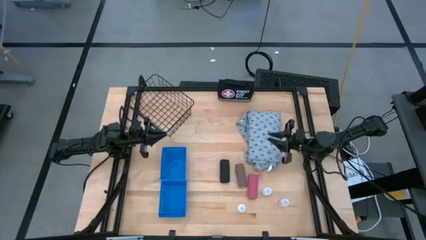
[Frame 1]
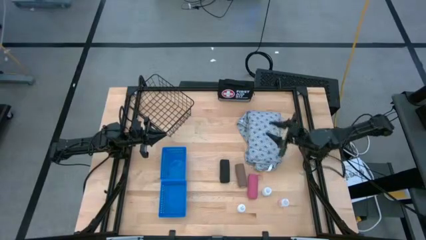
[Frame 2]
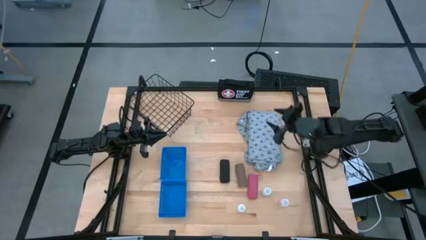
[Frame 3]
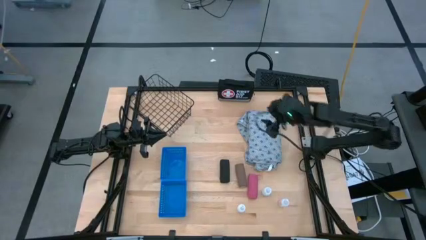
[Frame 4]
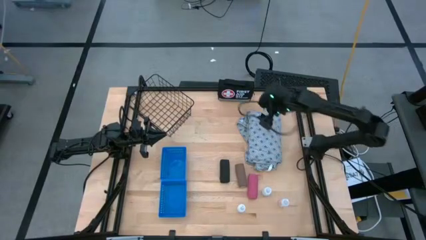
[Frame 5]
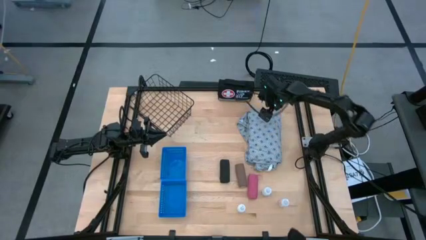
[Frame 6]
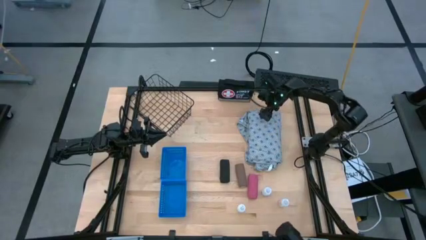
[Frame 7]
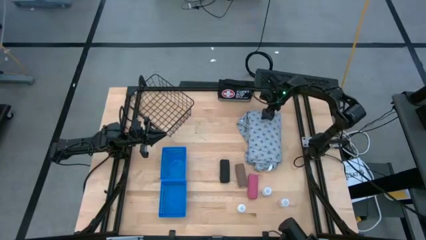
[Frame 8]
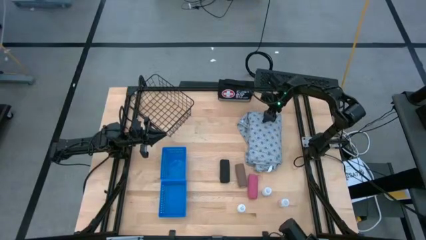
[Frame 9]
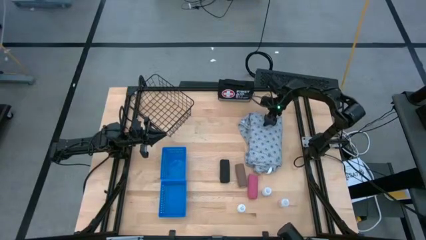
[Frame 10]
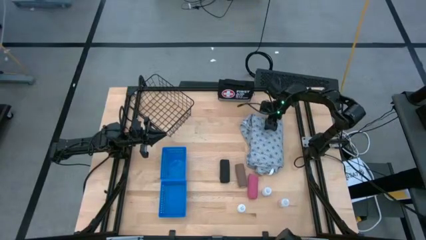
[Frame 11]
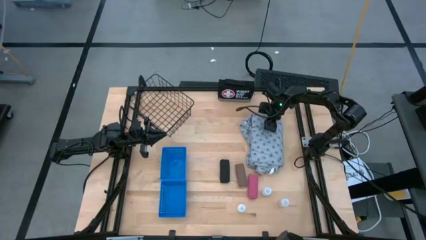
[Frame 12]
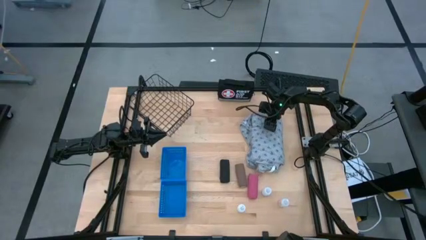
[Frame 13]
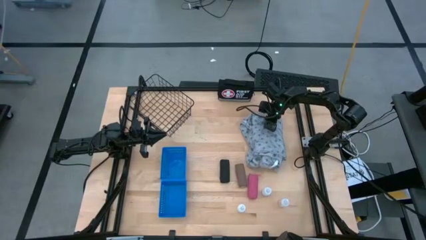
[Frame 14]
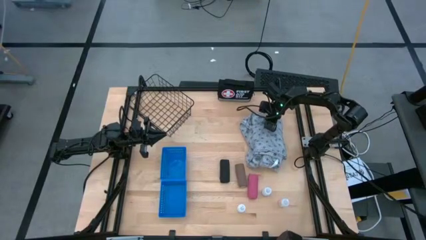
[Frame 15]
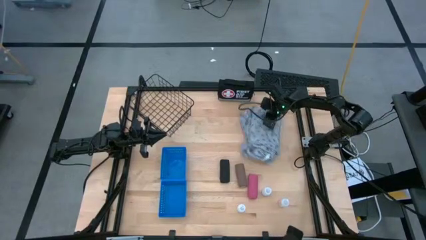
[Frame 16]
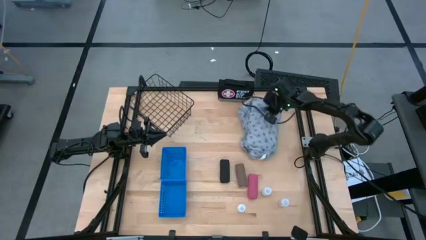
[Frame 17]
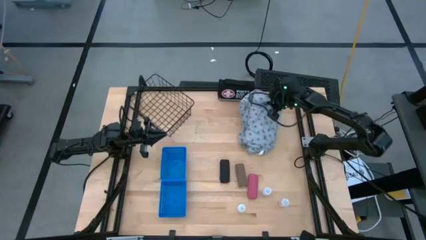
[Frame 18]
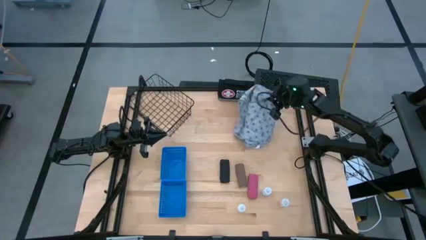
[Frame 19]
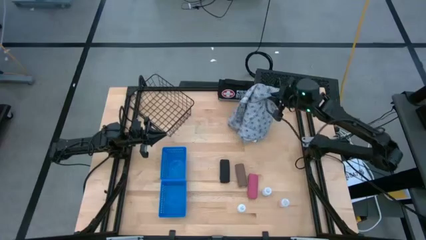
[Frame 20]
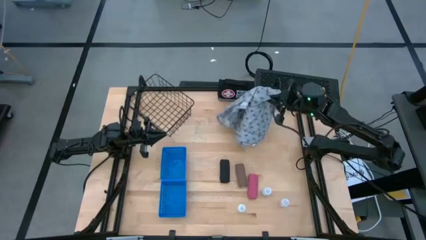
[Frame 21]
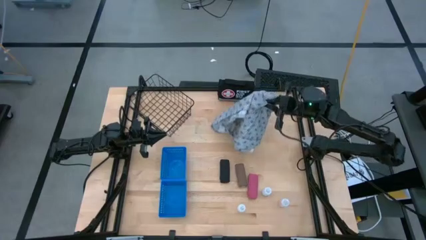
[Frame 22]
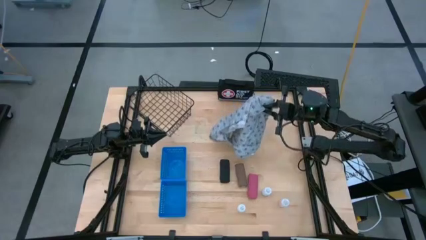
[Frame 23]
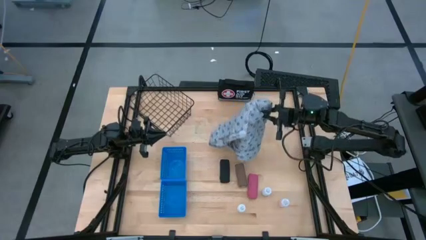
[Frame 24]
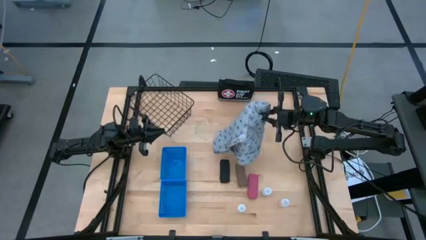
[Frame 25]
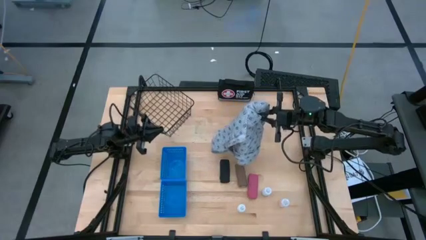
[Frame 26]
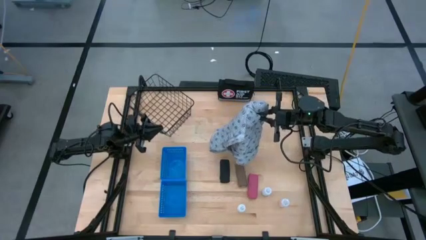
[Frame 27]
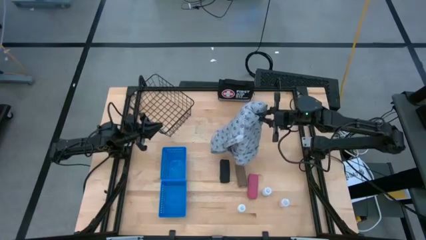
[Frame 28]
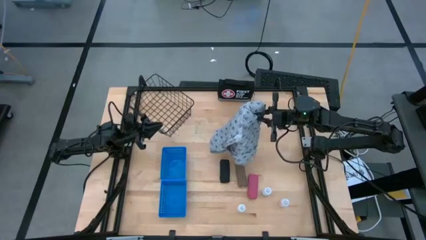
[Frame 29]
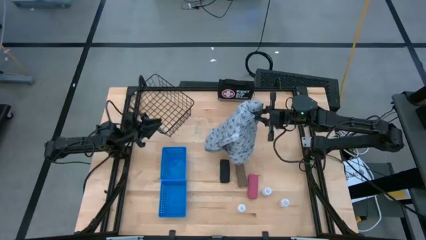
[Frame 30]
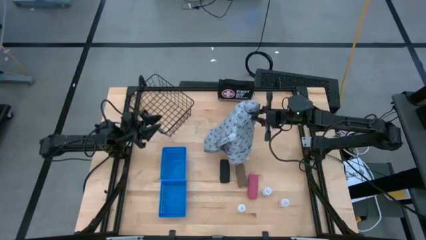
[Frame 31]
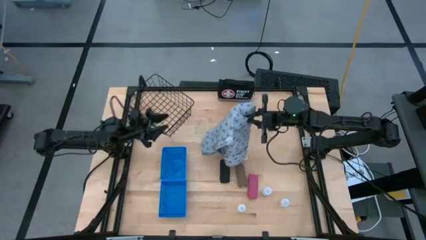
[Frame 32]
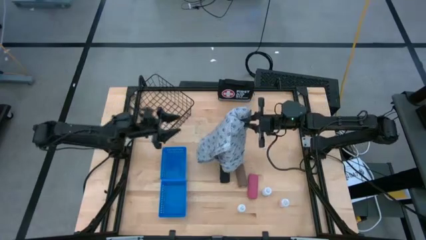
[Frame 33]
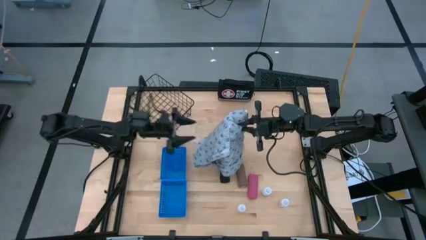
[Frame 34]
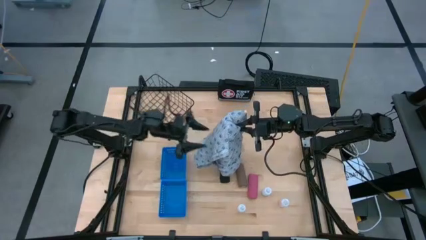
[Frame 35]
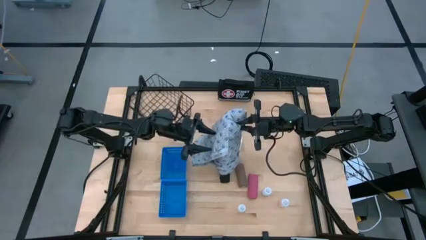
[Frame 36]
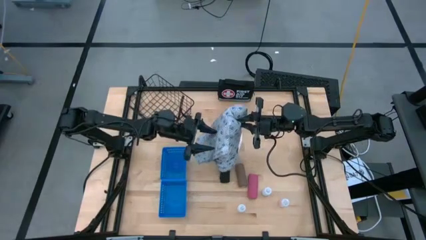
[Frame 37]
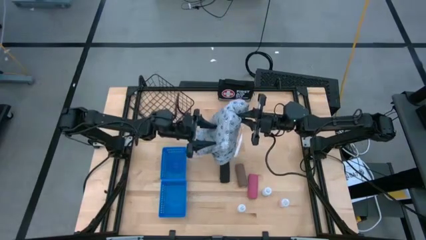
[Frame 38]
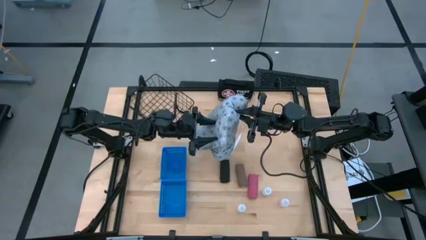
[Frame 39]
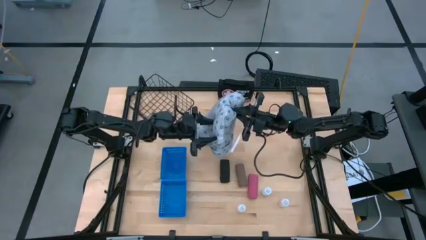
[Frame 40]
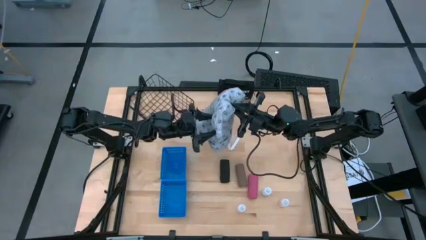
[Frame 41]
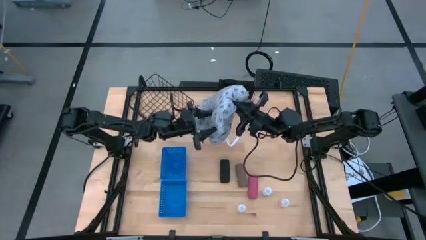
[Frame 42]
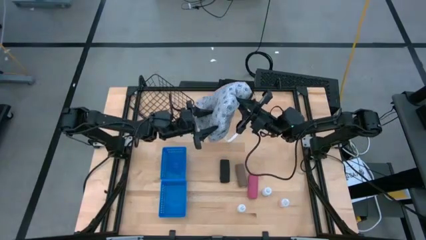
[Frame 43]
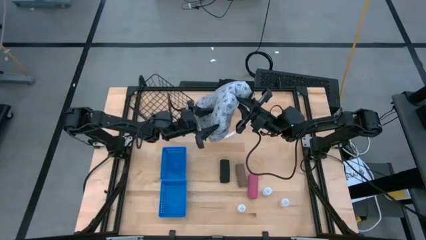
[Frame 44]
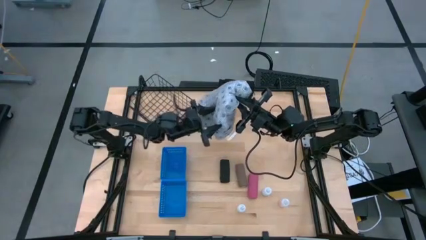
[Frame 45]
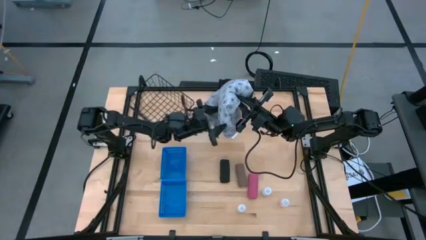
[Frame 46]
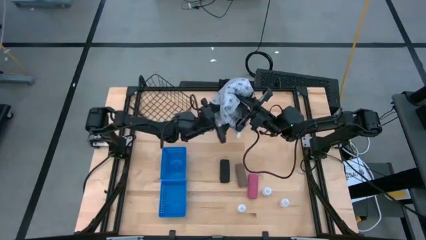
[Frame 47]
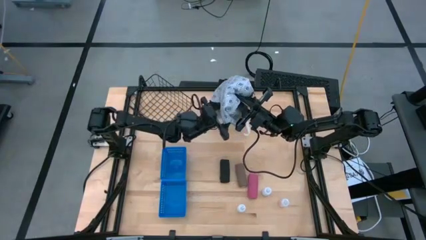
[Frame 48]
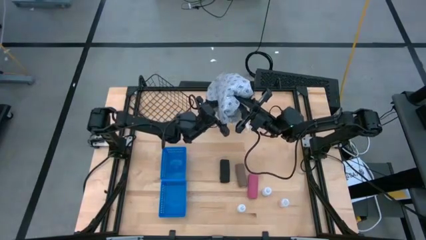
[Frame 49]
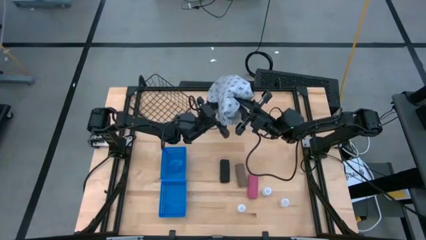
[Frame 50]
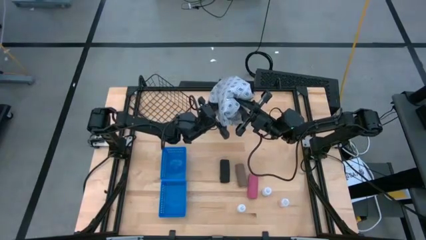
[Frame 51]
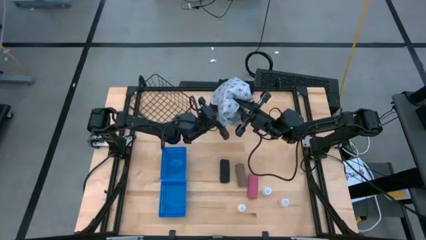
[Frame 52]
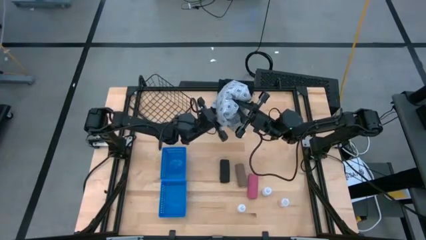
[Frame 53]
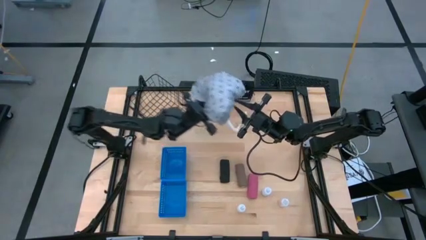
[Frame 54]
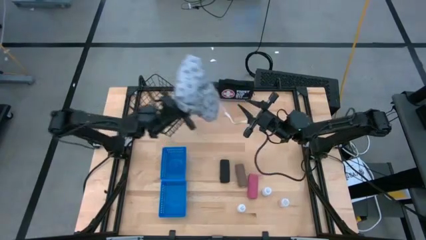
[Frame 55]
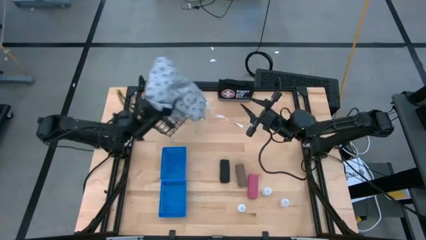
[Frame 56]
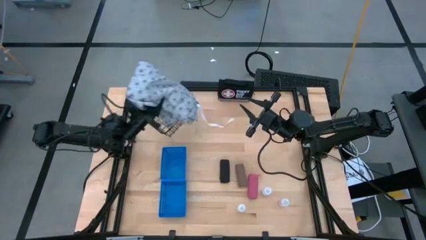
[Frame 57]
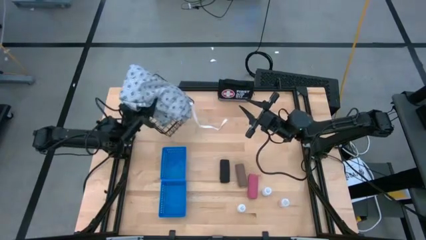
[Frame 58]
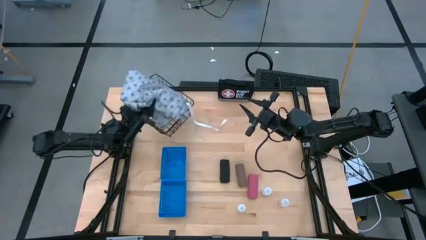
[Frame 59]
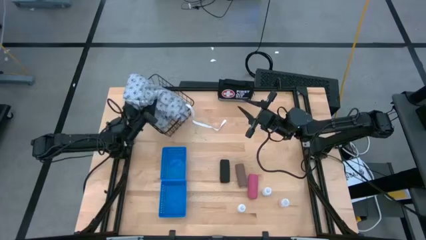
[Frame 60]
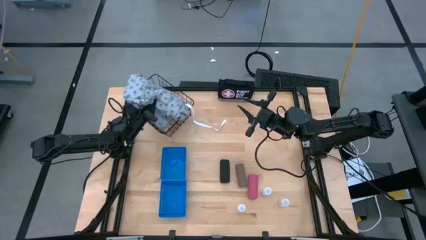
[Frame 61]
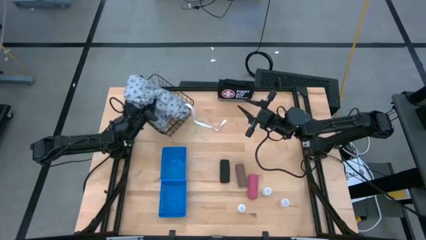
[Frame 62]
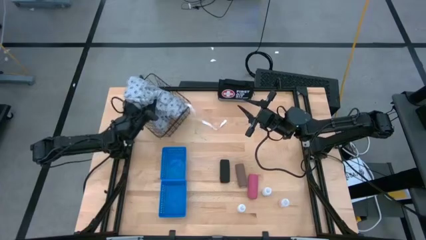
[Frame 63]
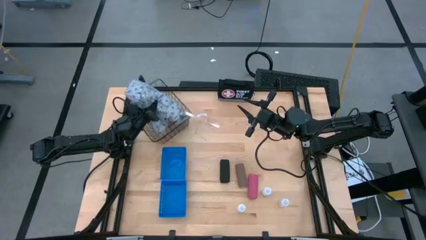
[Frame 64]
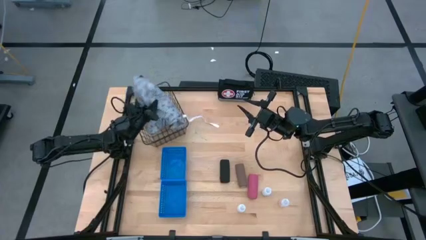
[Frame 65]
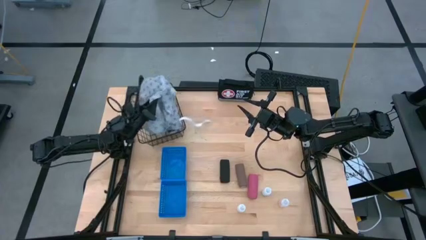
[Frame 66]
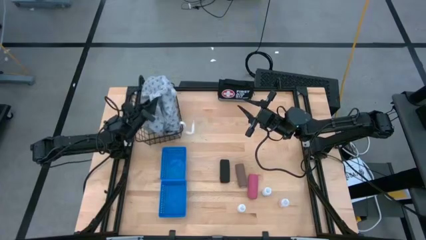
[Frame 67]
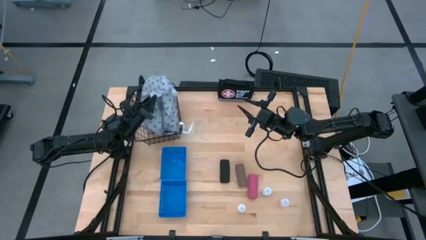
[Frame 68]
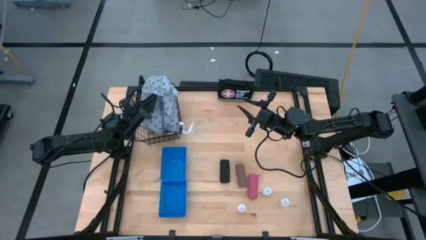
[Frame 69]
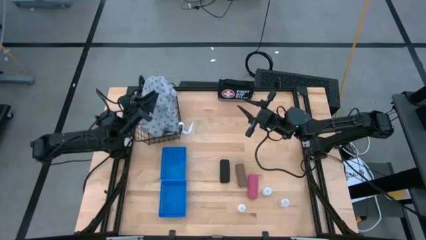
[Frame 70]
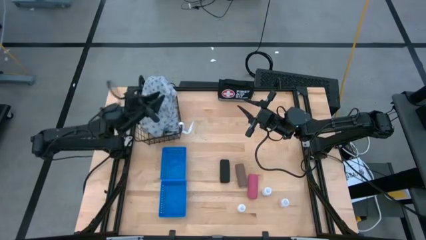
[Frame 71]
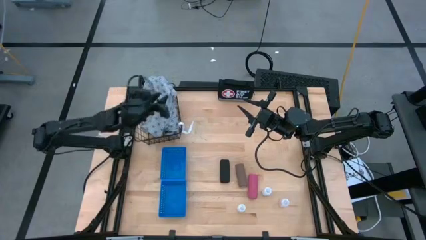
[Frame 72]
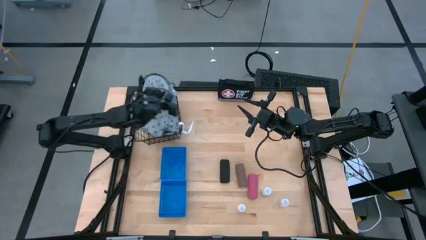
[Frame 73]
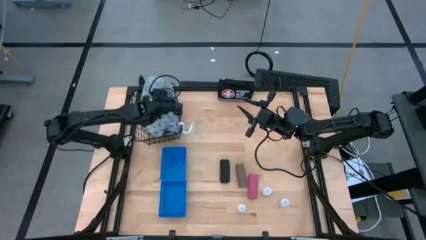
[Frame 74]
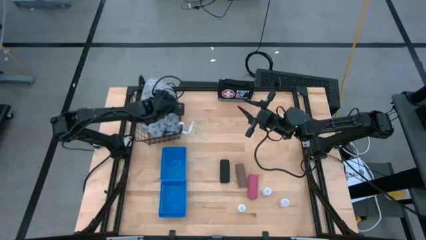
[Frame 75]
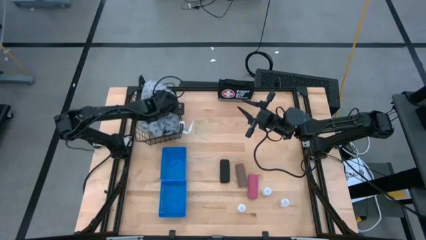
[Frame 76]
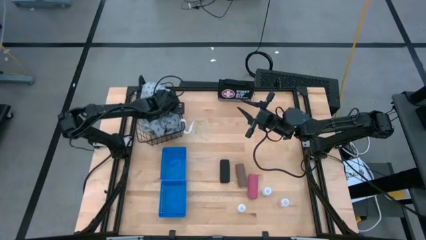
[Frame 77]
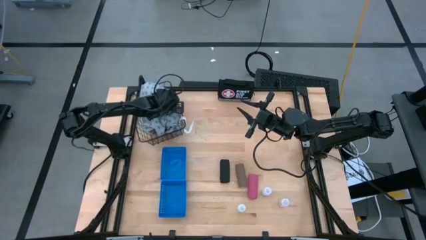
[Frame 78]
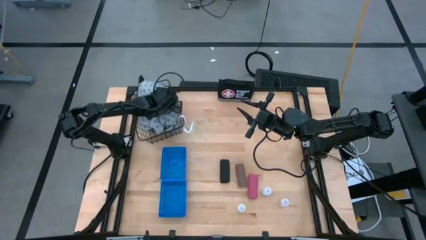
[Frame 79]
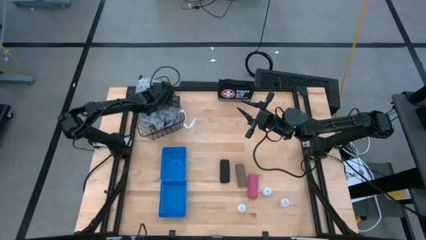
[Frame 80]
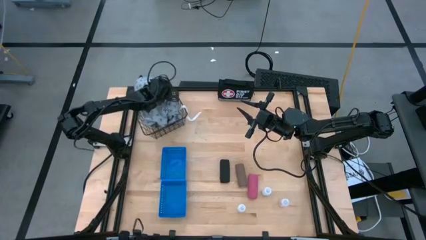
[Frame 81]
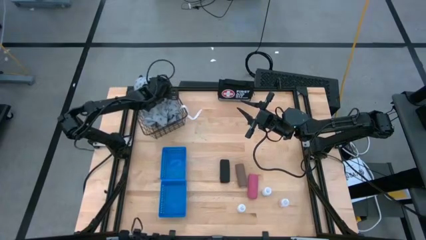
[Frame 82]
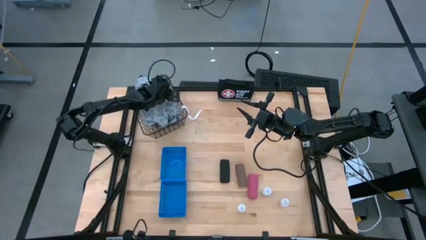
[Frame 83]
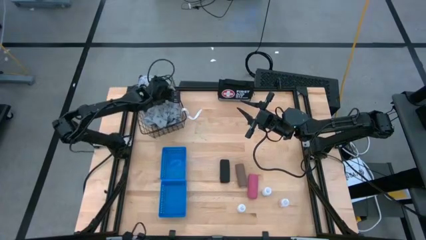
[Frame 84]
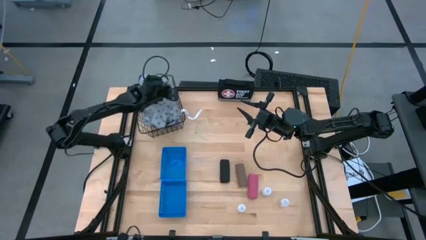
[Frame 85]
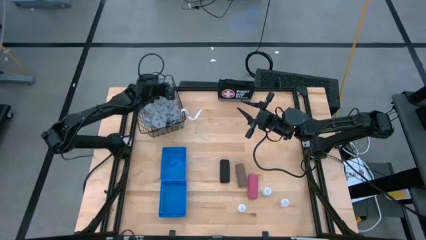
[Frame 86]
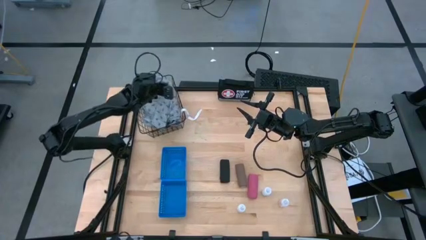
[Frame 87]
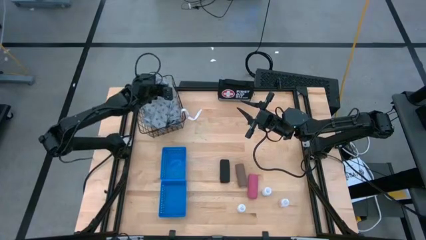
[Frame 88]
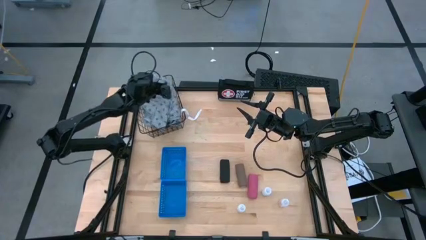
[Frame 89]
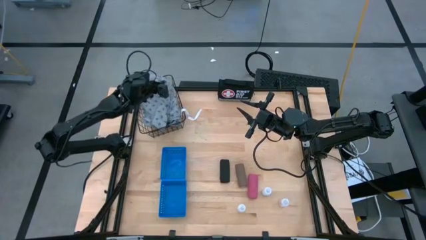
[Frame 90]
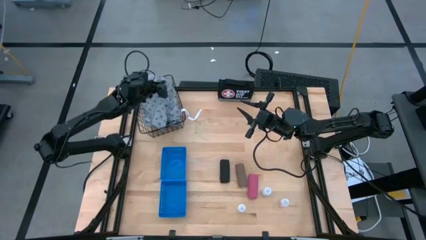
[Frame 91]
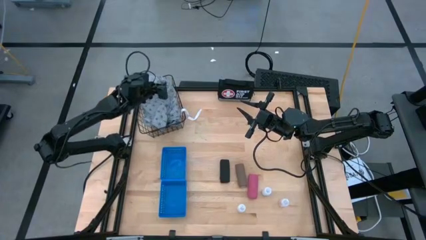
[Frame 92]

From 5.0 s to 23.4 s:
Task: Pick & Place Medicine items
Put the the gray patient gown into the black basket
